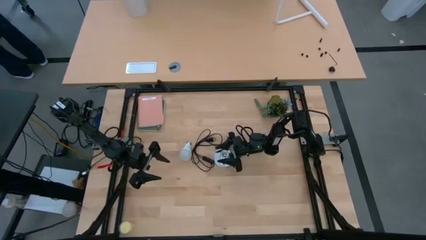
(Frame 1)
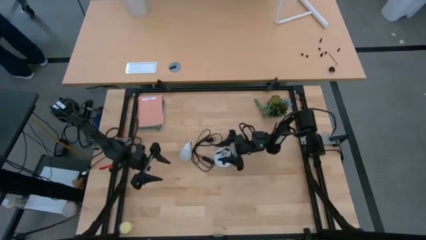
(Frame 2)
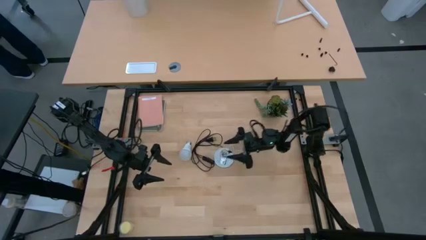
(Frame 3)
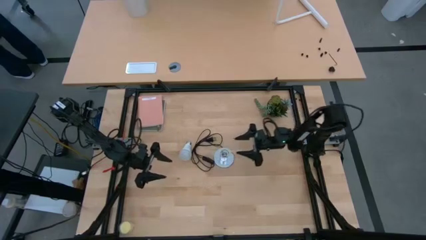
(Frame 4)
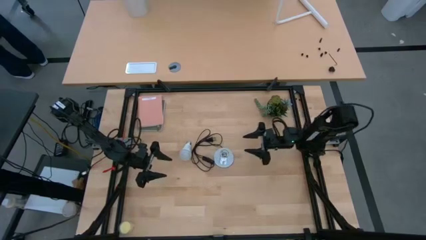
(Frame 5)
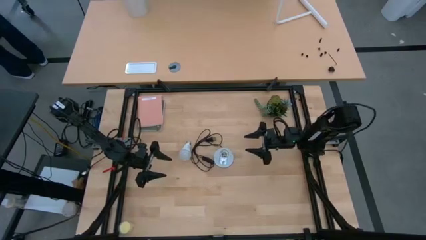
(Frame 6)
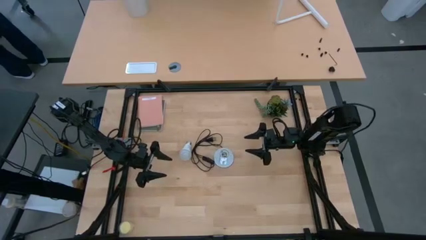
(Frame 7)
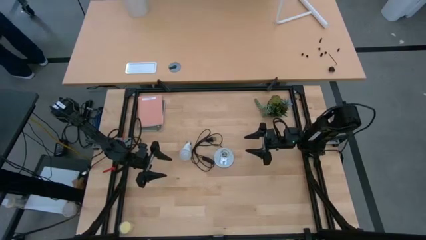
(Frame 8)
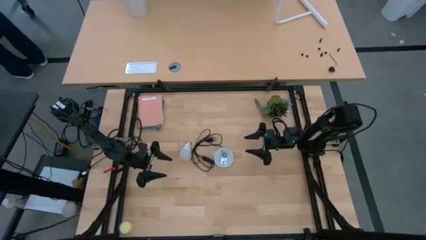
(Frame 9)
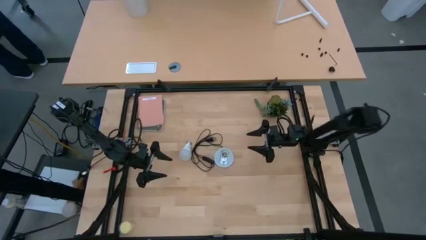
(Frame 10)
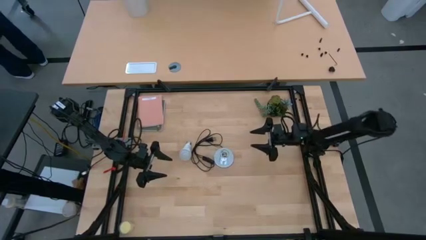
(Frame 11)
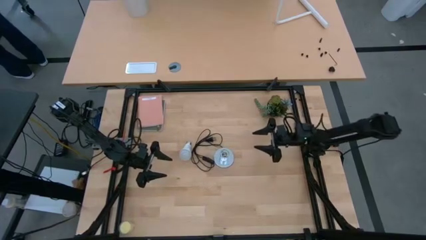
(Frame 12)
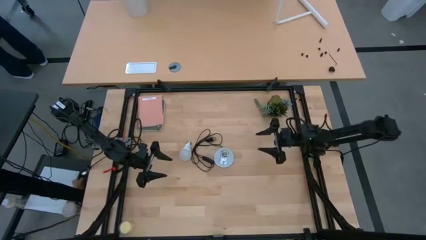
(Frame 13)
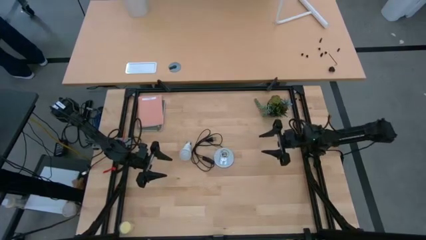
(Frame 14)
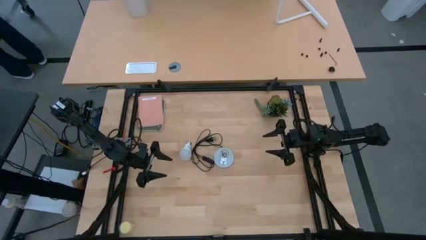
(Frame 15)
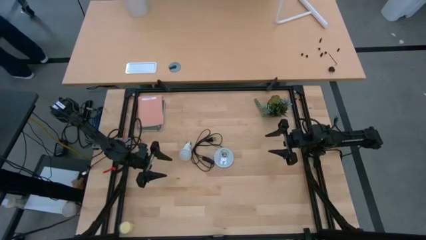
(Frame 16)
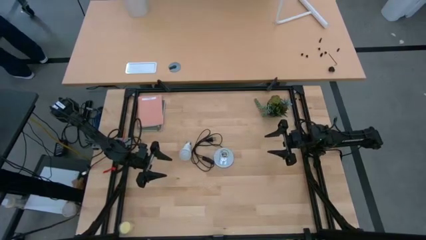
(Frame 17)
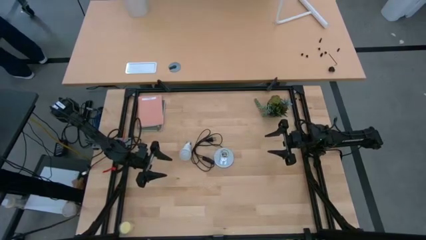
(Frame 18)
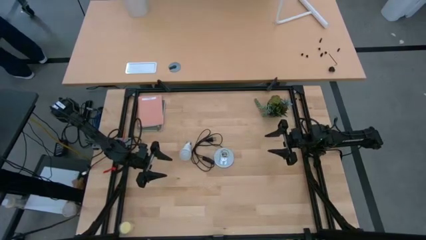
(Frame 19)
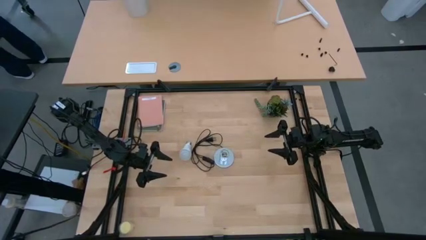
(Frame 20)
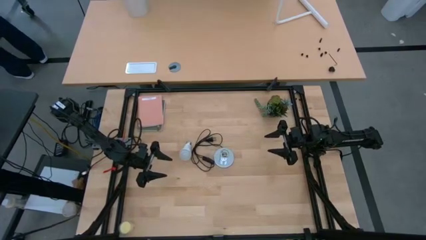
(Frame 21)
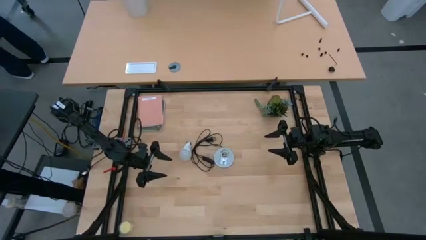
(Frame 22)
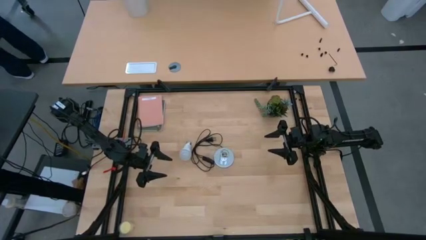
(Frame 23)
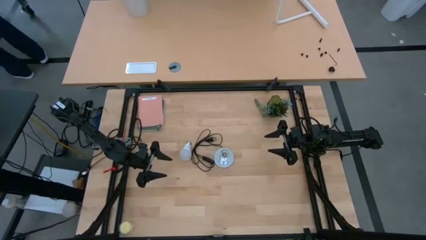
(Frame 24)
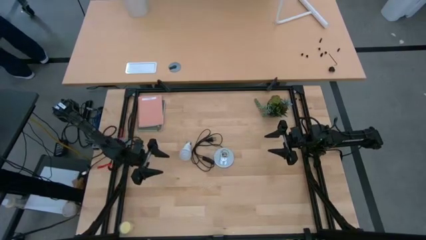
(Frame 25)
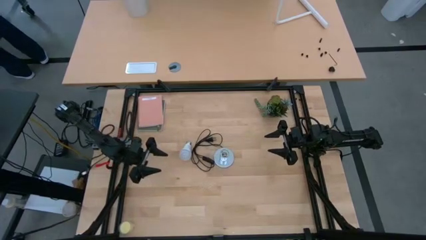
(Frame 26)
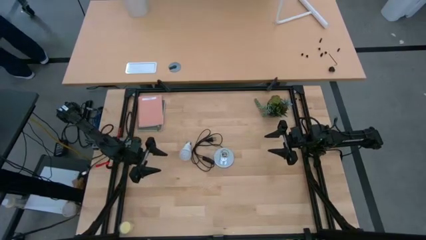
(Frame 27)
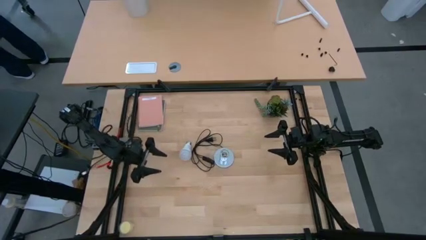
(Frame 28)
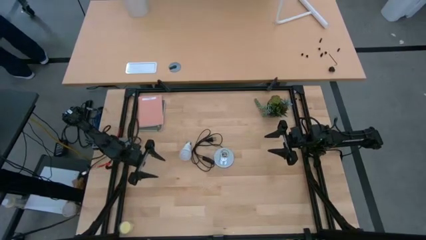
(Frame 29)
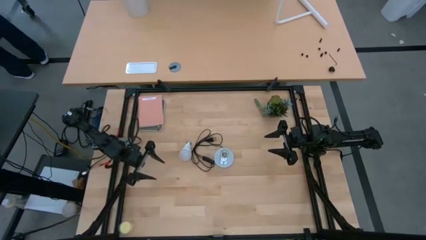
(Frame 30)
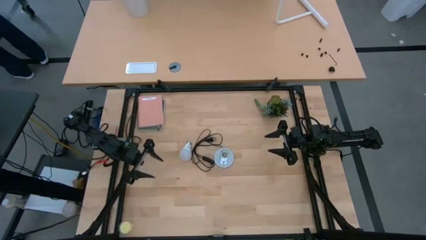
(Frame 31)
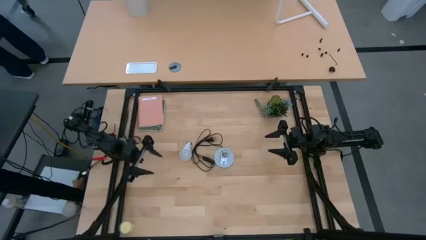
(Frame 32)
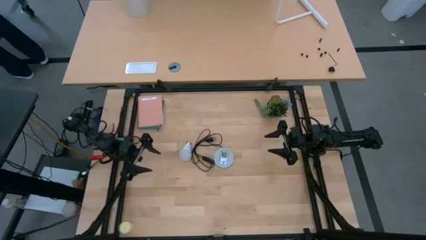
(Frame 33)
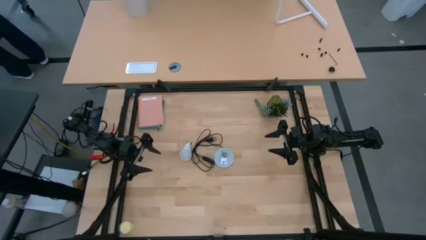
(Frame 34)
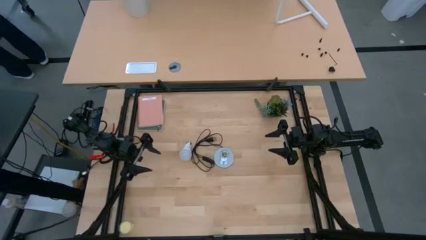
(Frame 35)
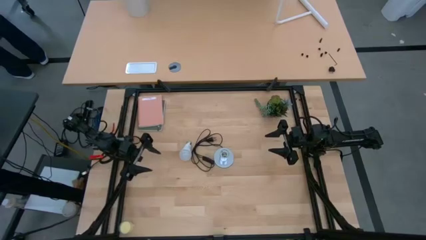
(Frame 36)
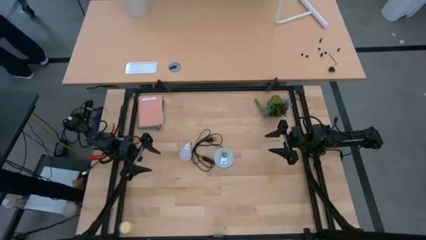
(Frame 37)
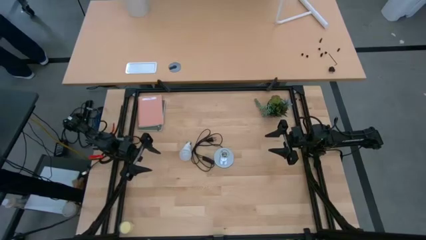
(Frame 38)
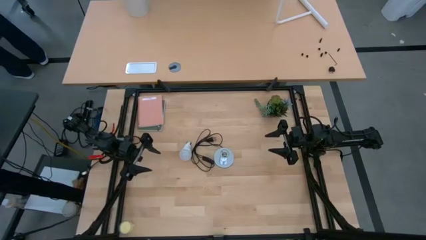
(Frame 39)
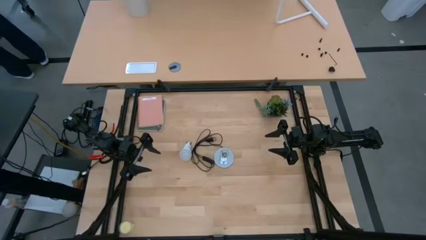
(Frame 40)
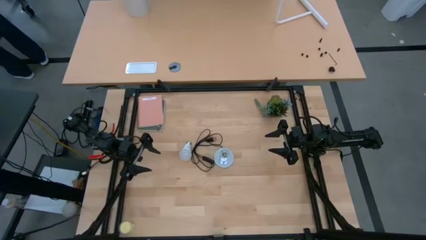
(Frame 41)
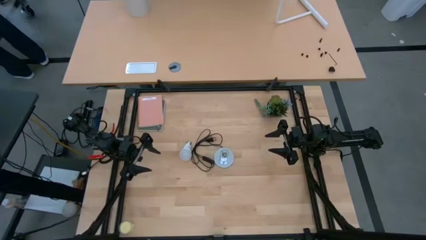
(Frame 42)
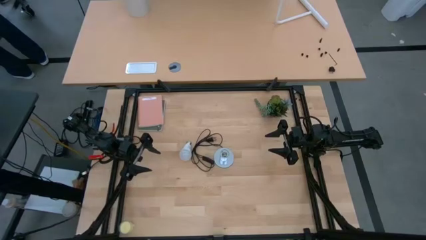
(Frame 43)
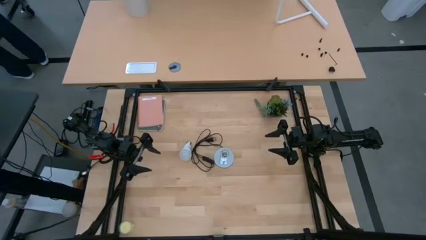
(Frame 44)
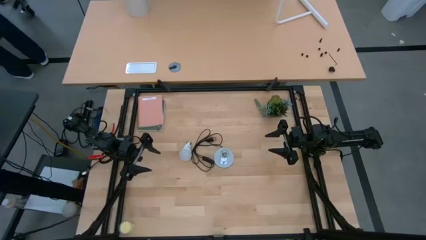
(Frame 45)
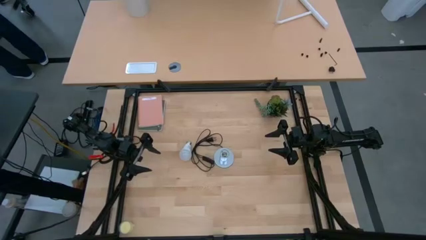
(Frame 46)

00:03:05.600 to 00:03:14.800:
Task: Screw lightbulb
Return to Home Position

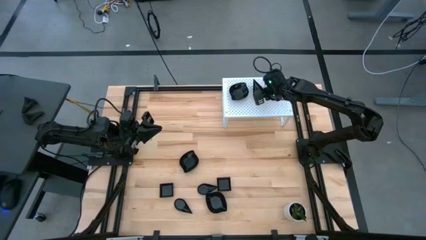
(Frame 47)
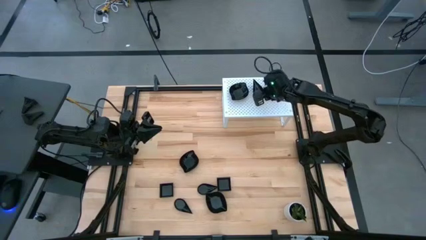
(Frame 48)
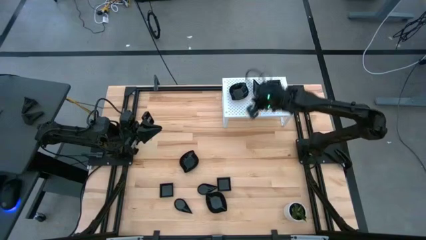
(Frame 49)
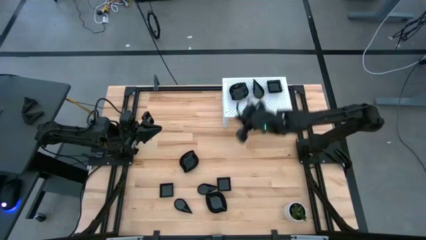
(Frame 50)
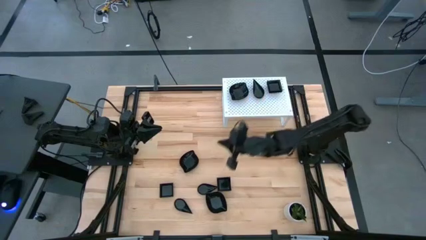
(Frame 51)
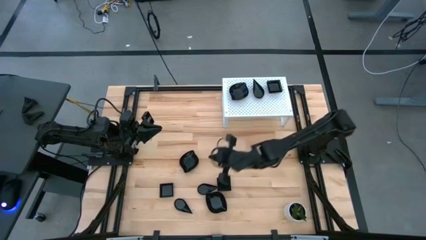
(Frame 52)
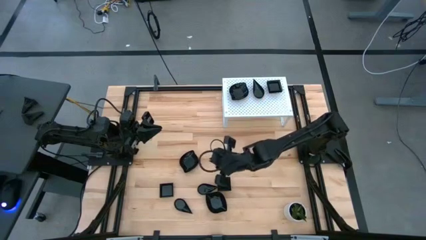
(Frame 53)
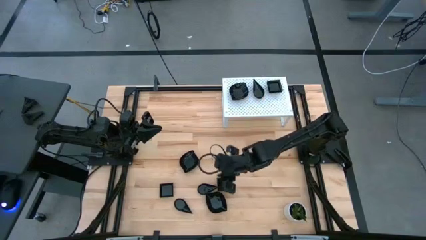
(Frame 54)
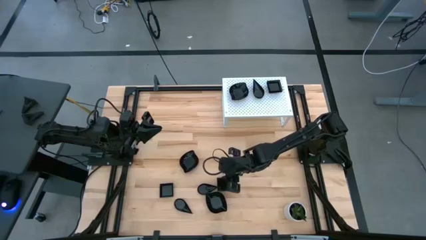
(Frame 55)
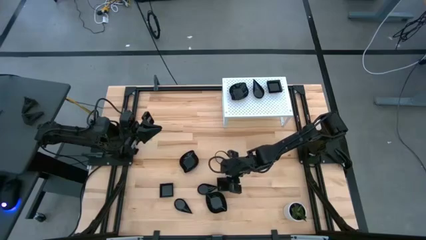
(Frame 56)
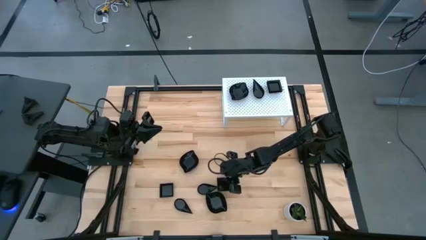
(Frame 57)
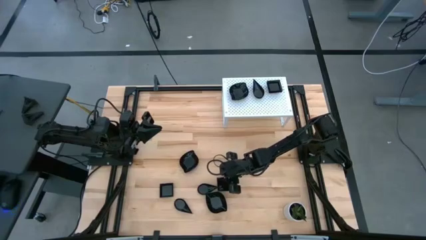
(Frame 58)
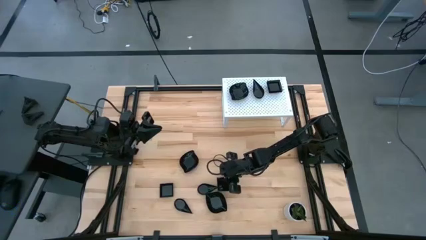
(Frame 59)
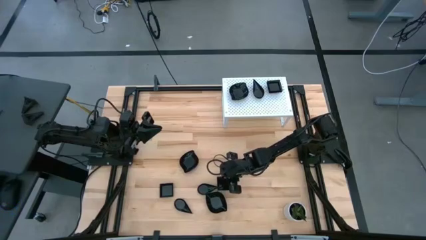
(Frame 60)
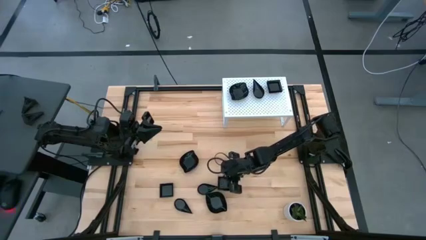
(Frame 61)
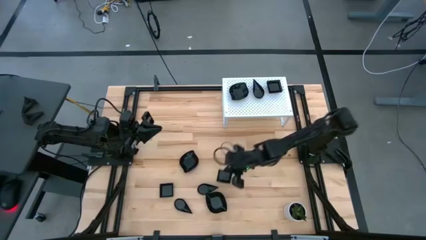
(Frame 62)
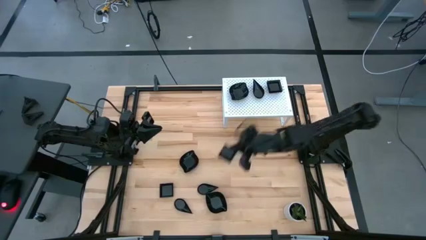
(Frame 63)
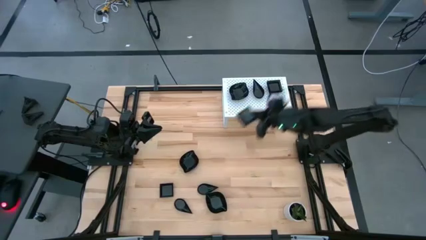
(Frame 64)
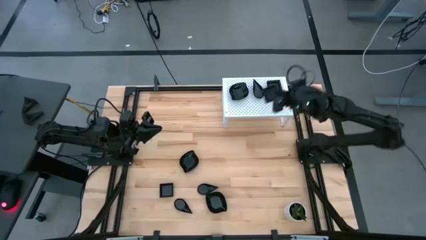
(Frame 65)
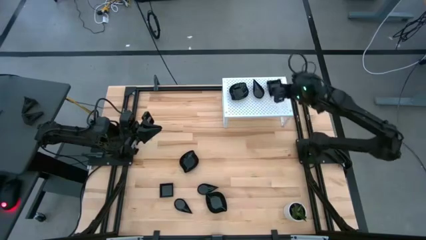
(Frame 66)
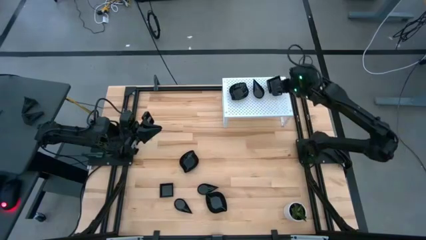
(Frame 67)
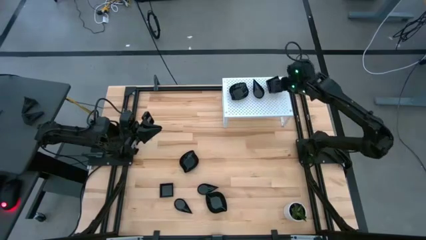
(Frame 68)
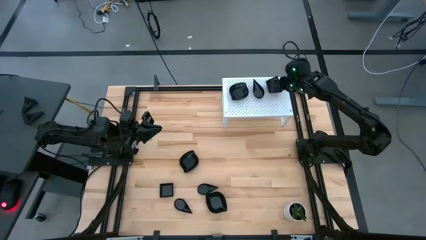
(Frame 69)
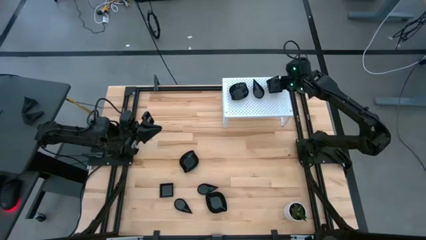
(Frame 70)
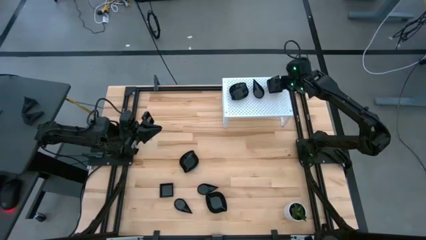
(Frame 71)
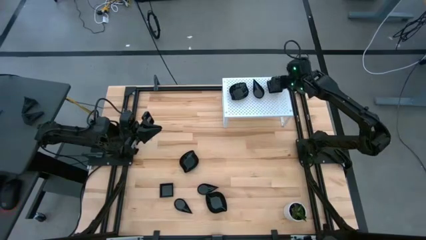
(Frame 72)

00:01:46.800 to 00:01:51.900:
Task: Pick & Place Mini shaped plates
Stack the square plate on top of the square plates on the shelf

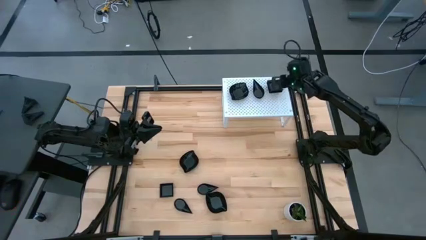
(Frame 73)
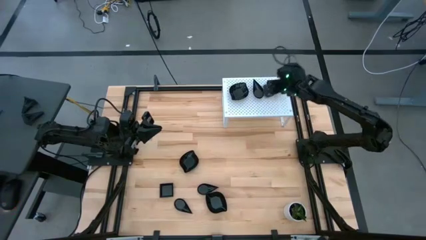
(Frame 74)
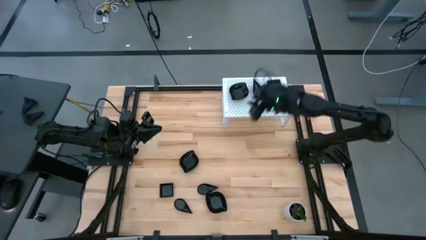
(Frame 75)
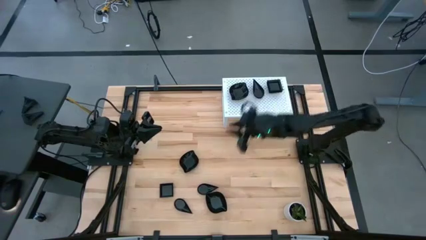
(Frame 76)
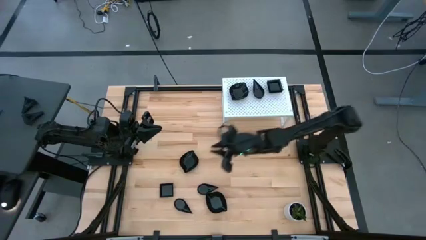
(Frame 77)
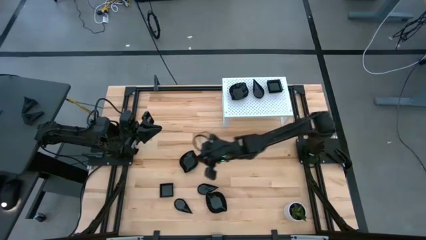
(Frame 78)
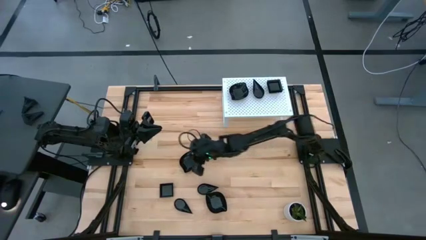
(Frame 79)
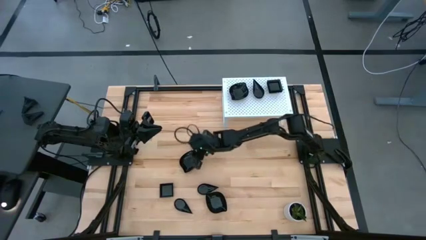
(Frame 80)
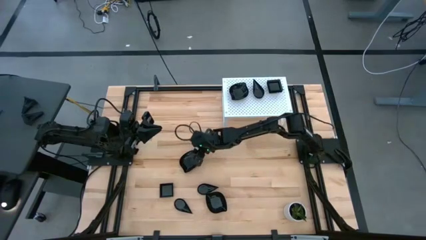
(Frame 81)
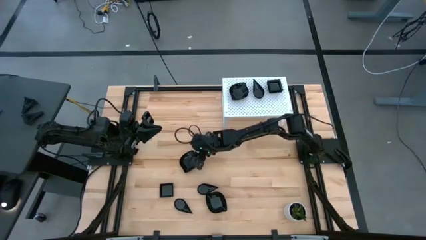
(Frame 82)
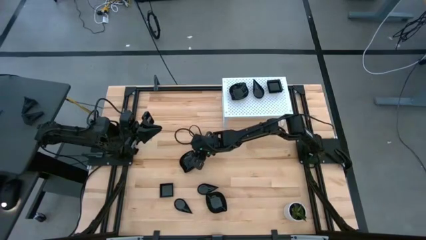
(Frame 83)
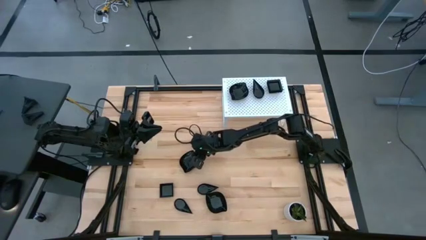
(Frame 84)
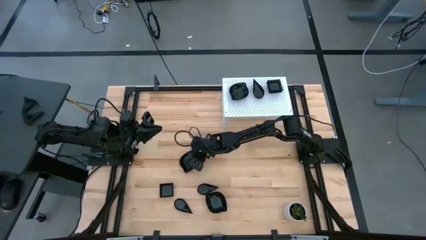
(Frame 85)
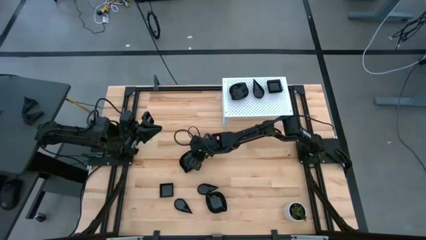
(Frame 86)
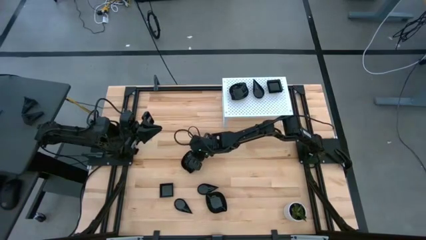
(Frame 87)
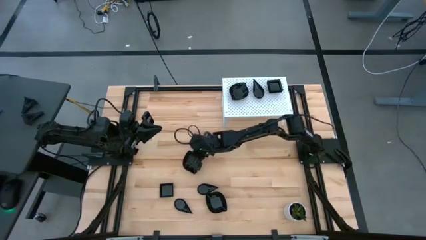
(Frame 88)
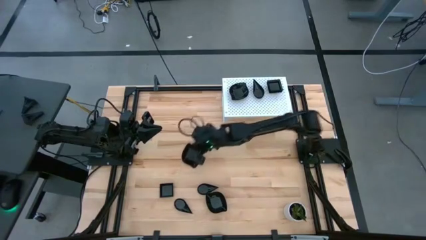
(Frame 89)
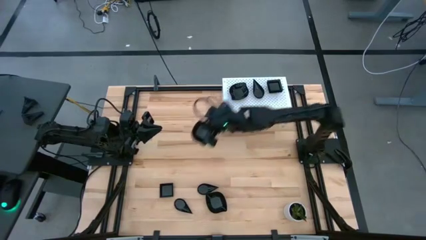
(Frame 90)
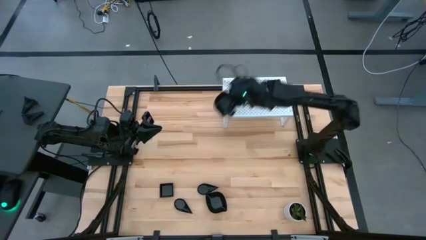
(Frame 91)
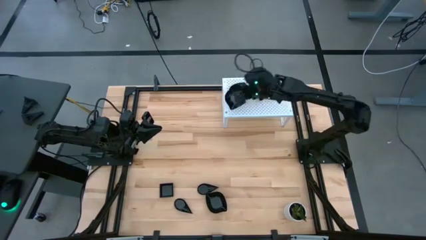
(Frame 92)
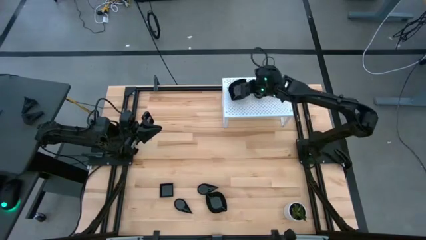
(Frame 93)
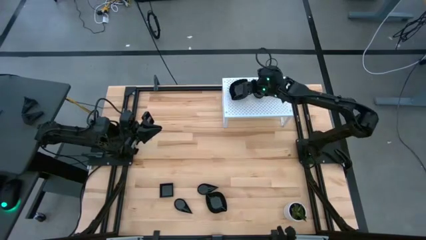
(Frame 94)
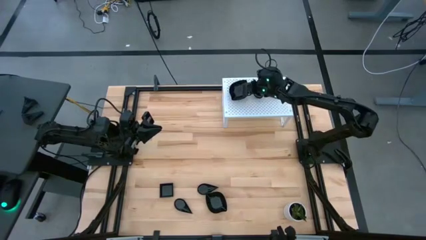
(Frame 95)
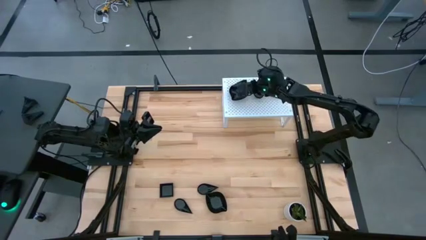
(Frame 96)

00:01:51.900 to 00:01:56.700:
Stack the leaf shaped plate on top of the leaf shaped plates on the shelf
